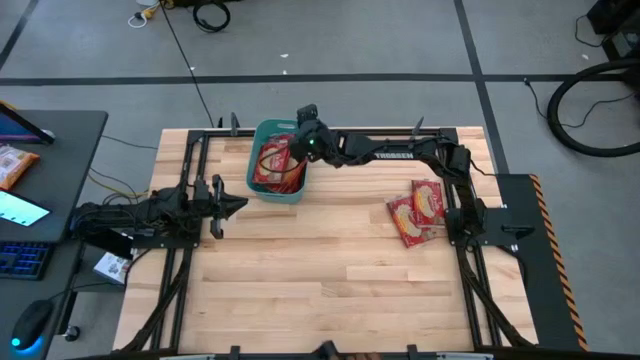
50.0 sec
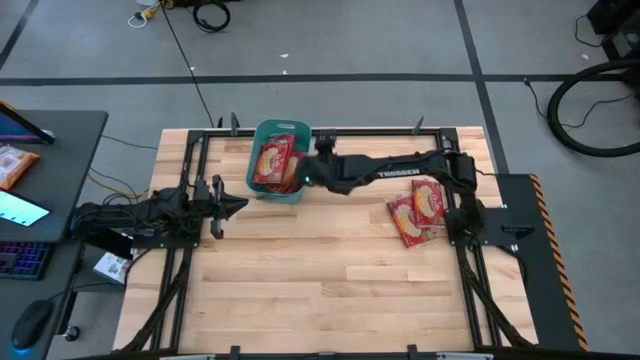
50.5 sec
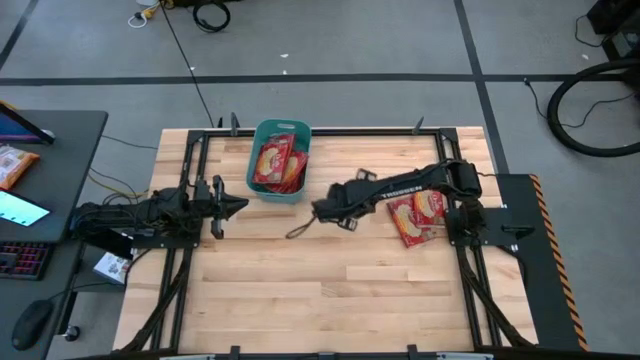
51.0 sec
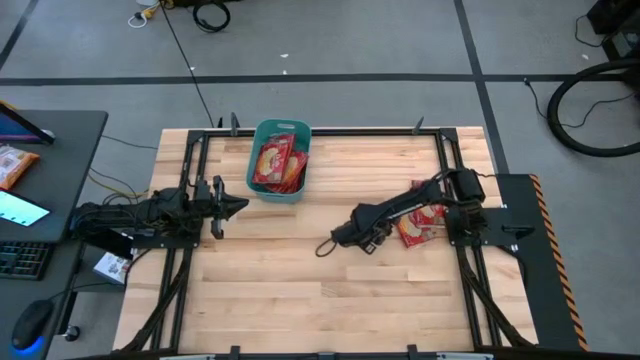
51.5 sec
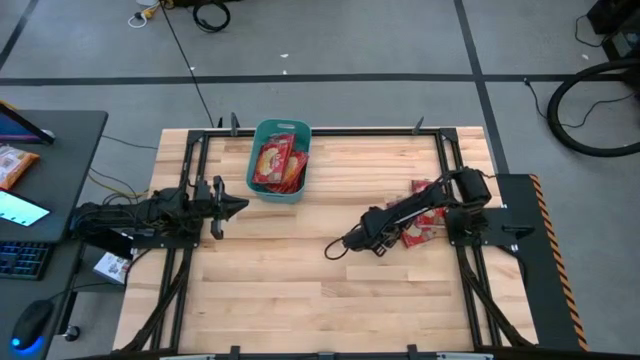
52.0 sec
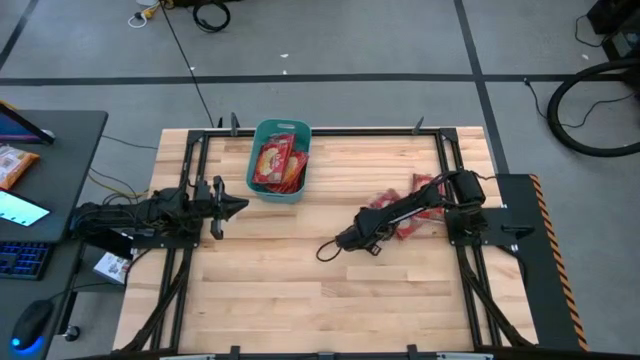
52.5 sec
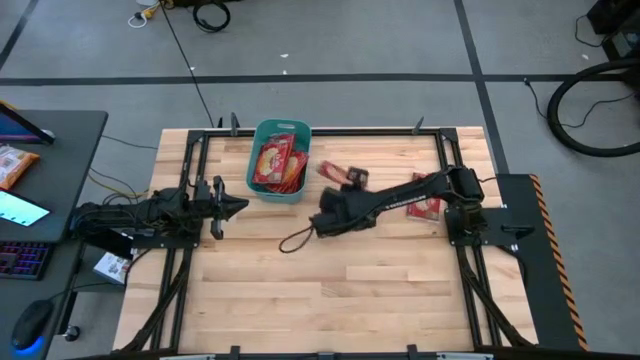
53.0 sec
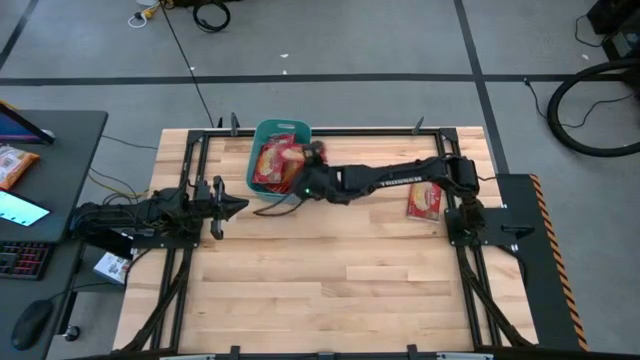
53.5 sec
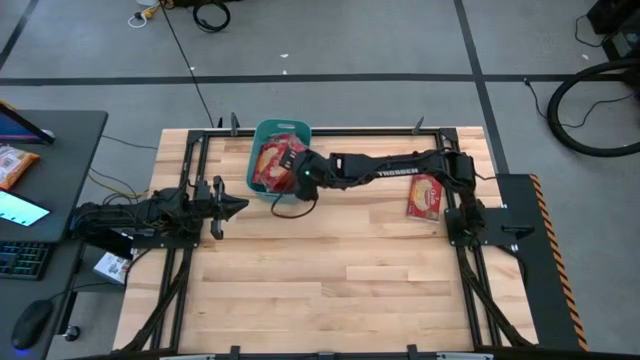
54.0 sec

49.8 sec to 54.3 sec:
Task: Sort popcorn bags into baskets
Put the red popcorn bag into the green bin

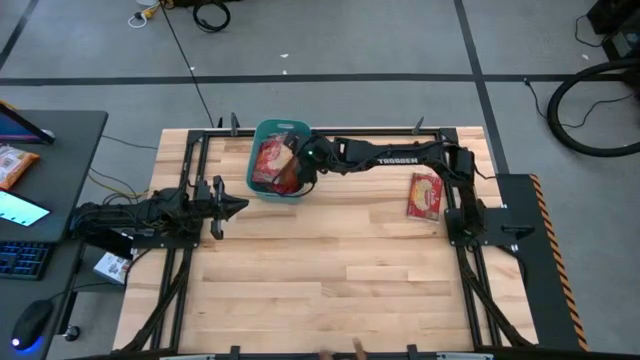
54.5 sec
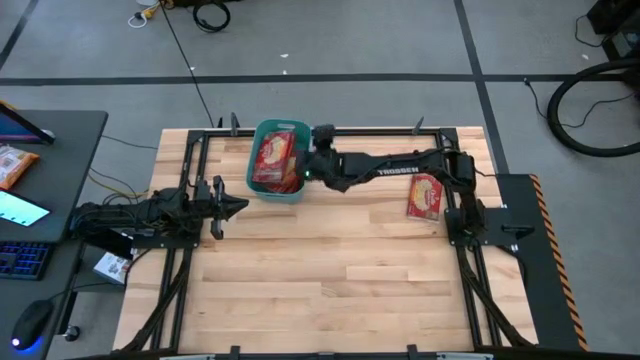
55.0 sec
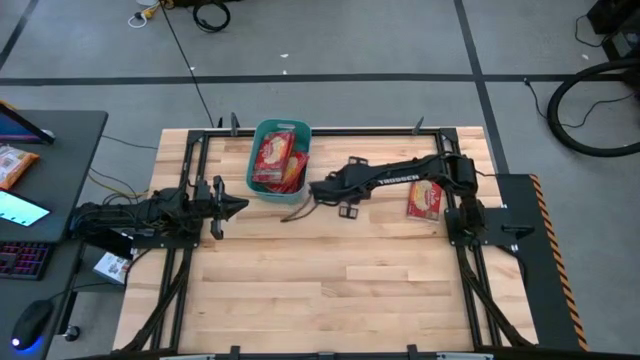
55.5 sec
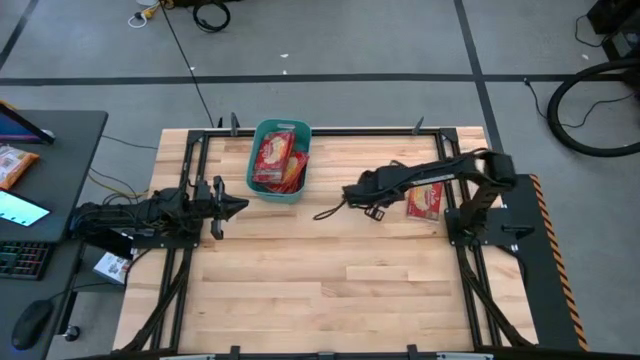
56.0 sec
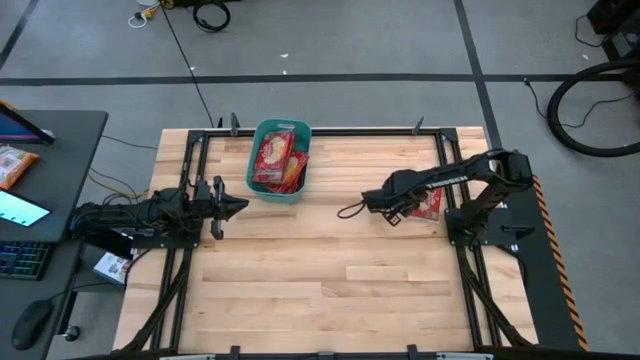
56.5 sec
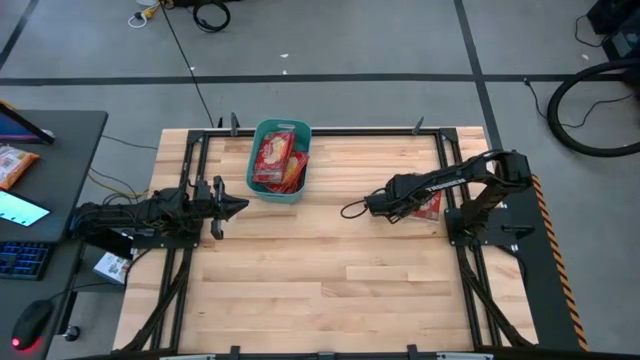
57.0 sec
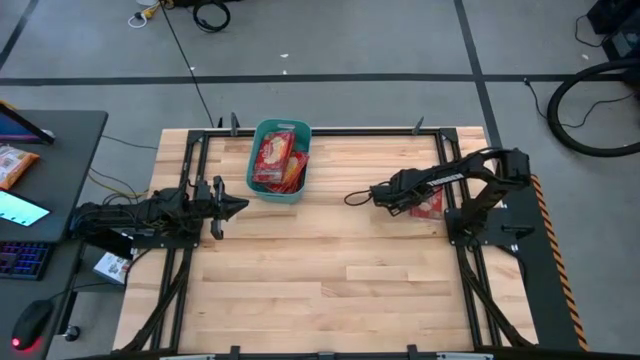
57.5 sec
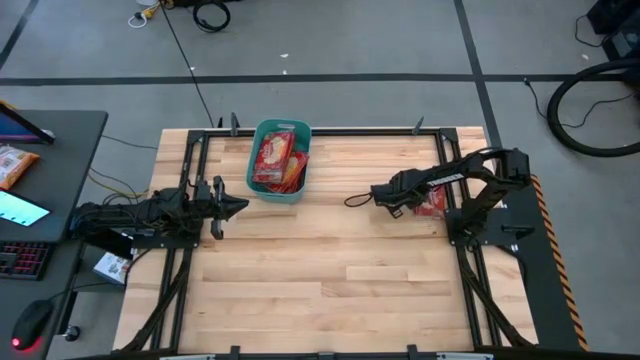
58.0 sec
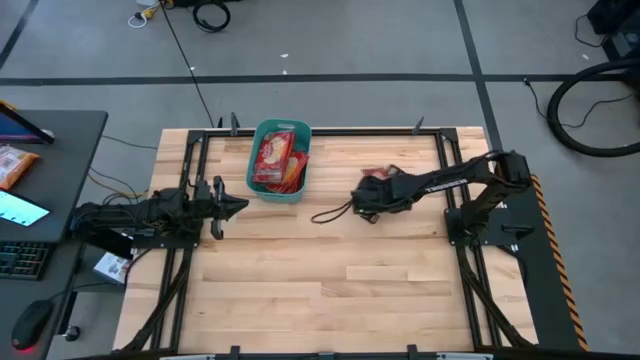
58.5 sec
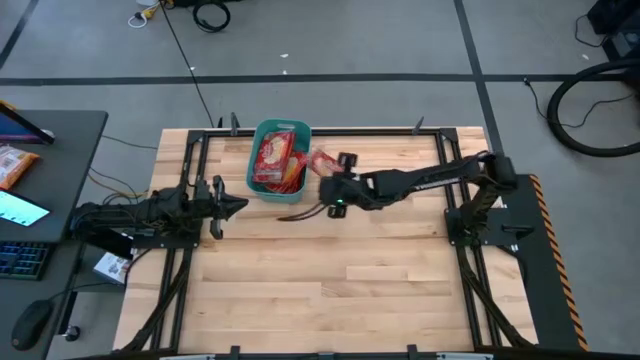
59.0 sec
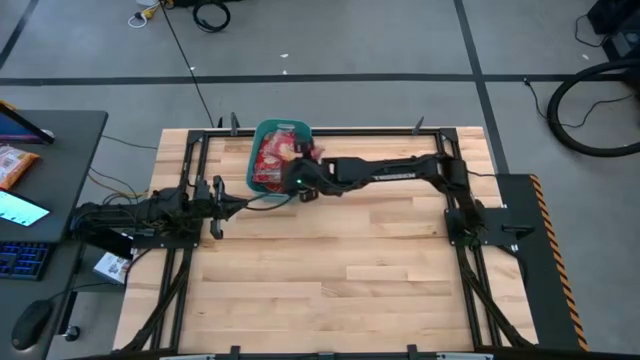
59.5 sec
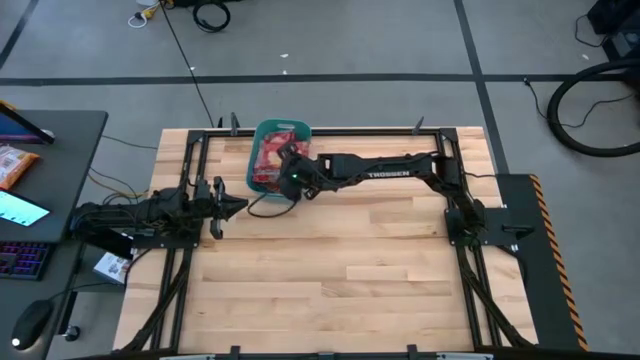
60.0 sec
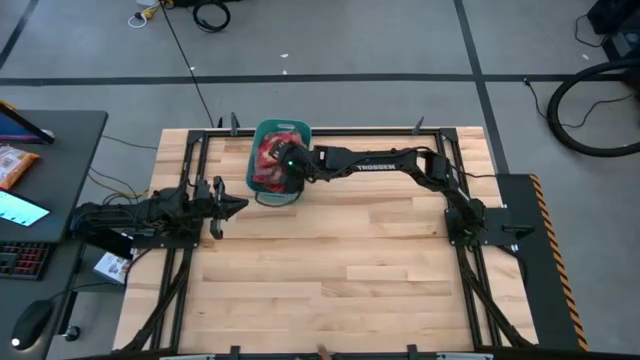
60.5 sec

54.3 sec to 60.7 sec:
Put the red popcorn bag into the green bin

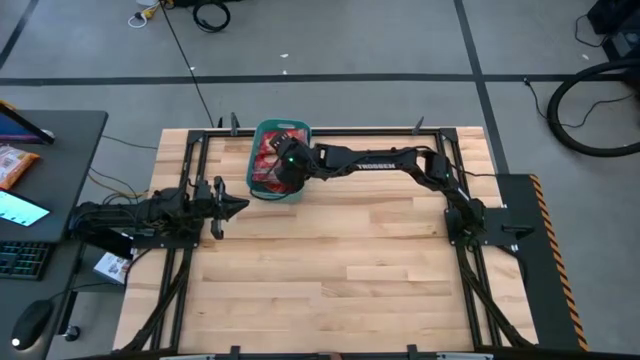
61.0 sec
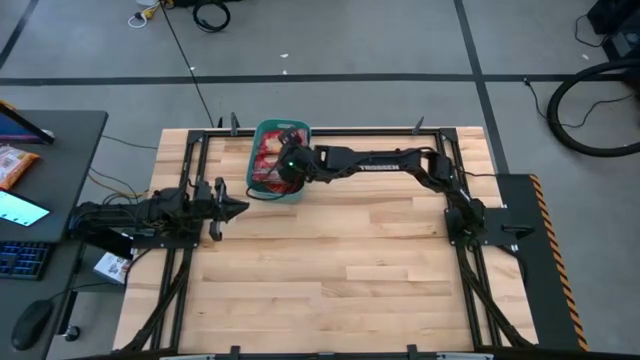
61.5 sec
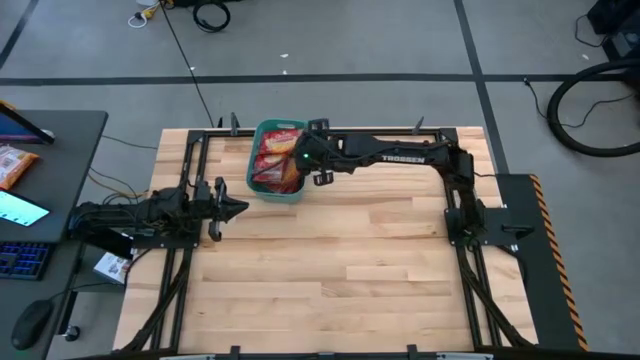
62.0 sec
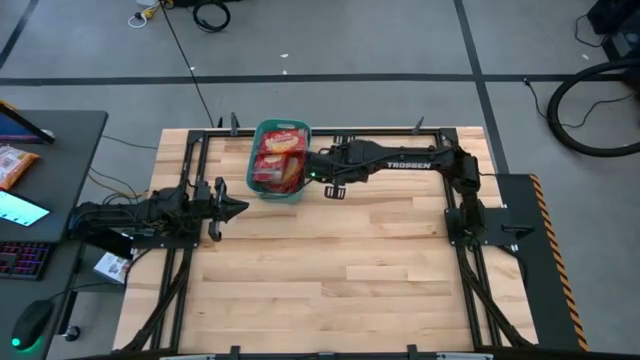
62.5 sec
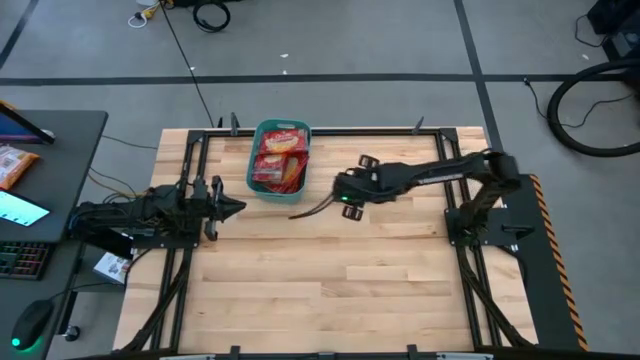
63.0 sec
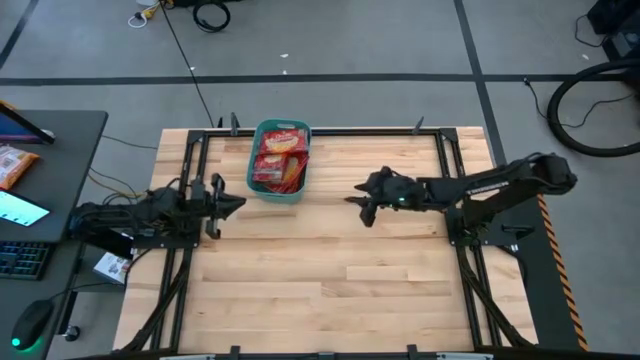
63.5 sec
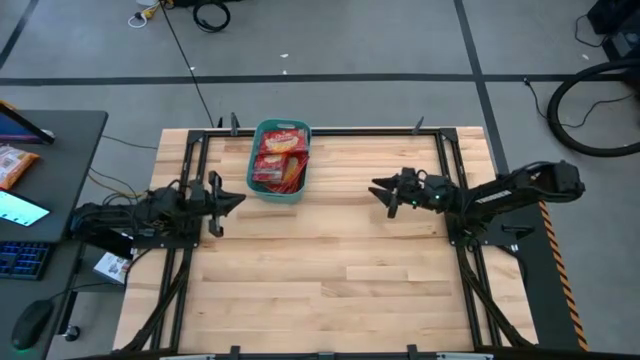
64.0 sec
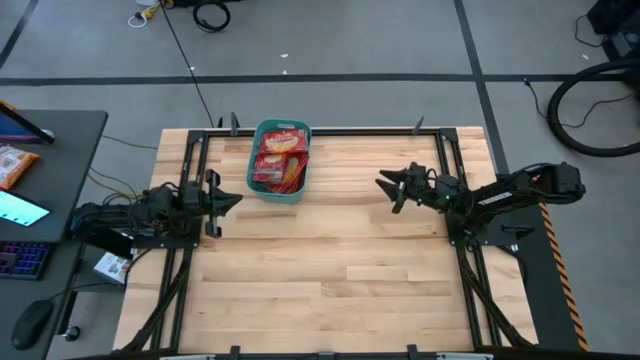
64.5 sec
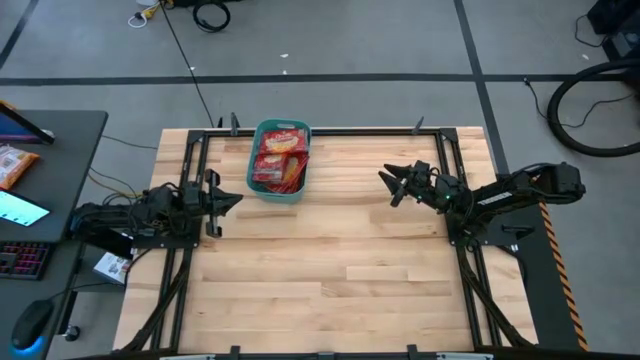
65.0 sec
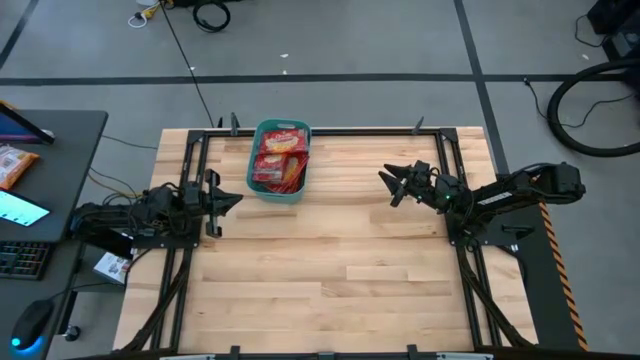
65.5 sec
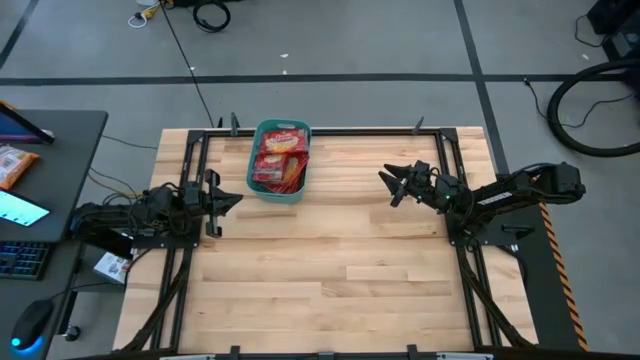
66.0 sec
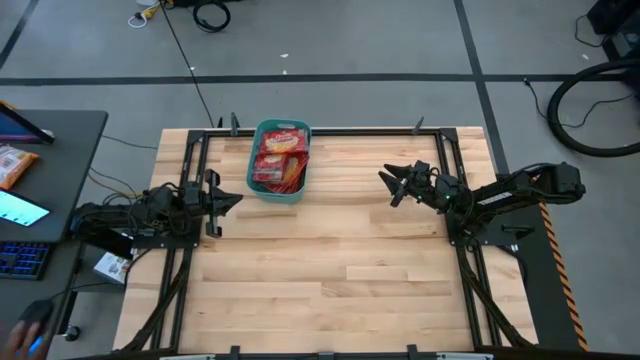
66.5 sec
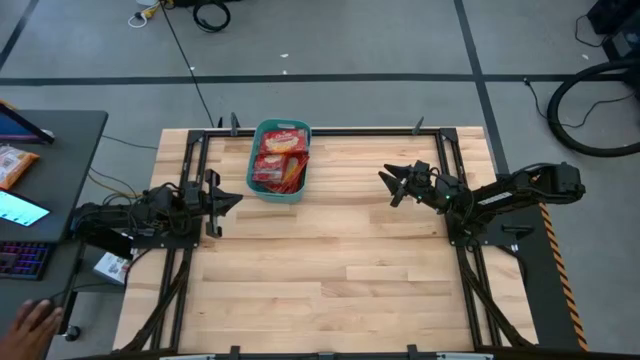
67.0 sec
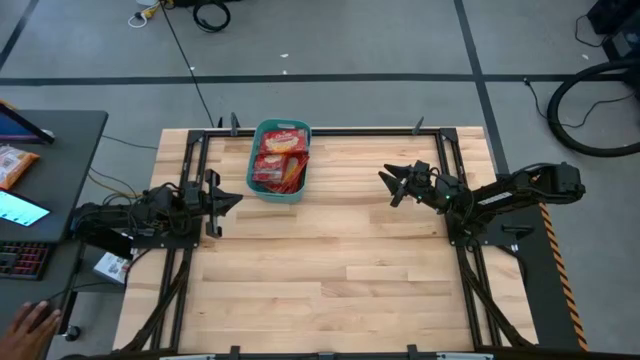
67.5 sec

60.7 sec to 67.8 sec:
Return to Home Position

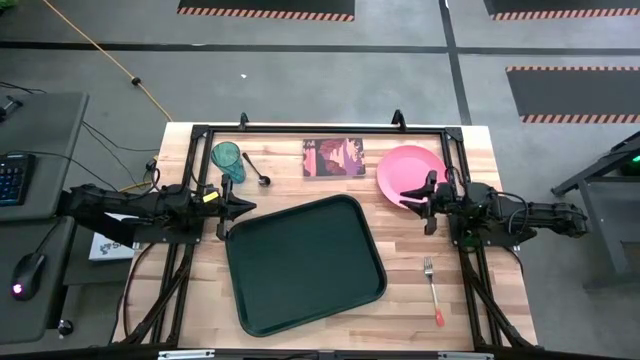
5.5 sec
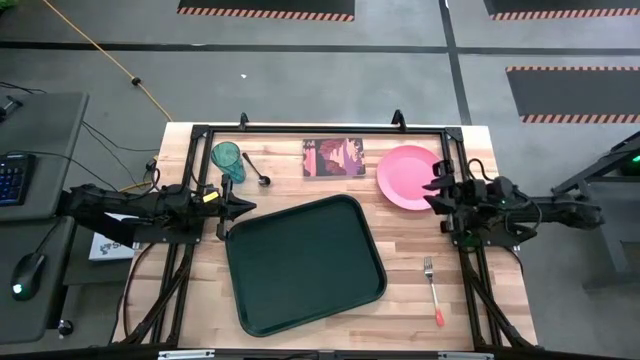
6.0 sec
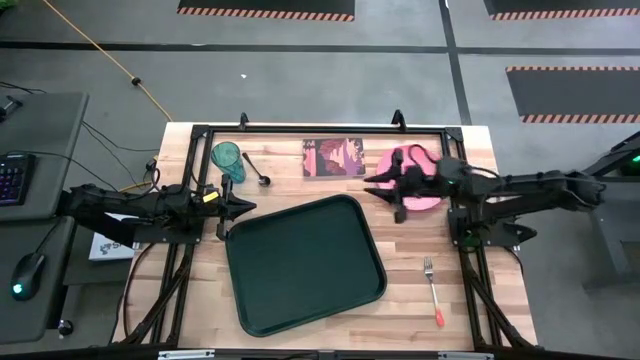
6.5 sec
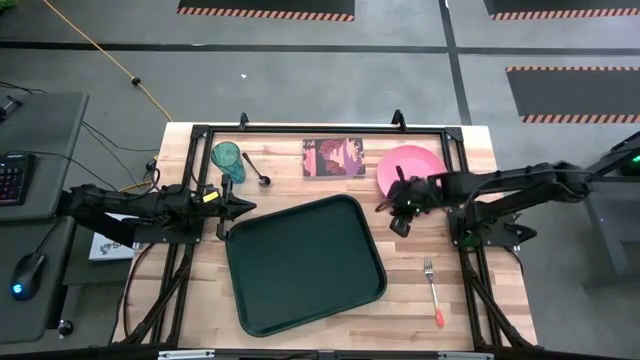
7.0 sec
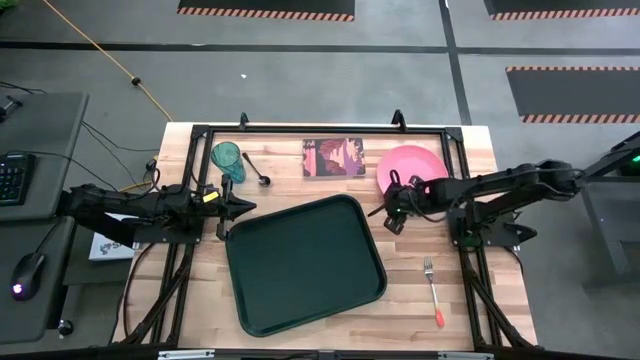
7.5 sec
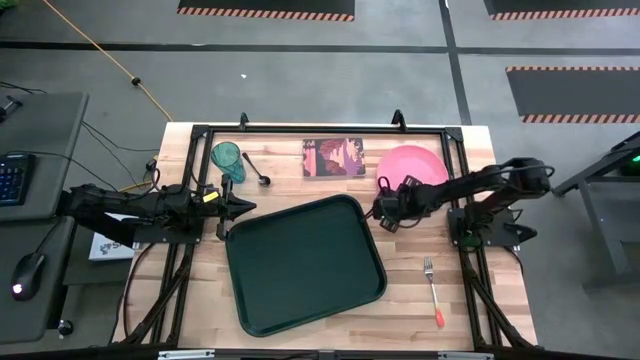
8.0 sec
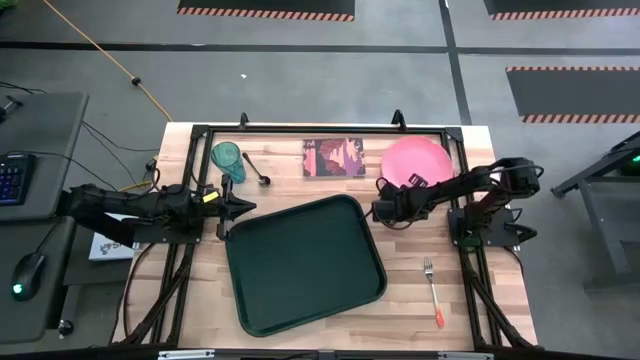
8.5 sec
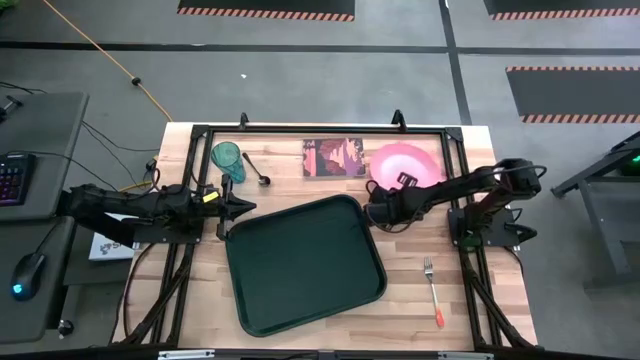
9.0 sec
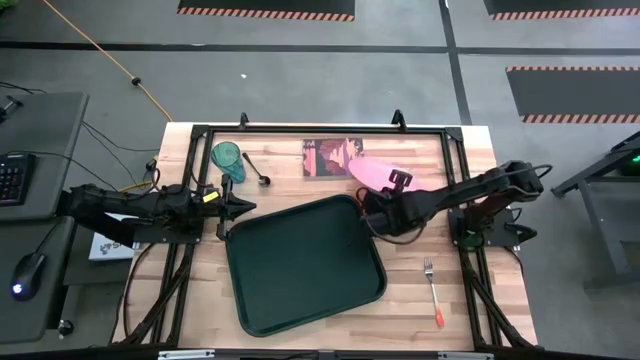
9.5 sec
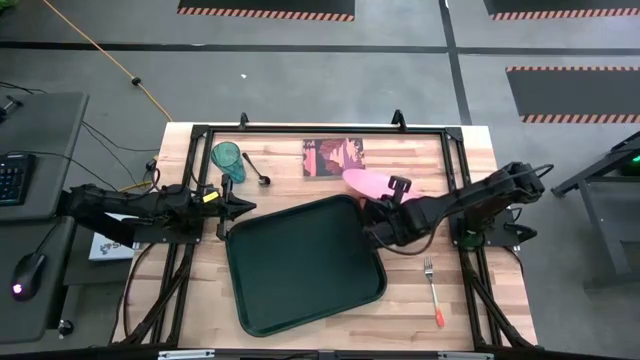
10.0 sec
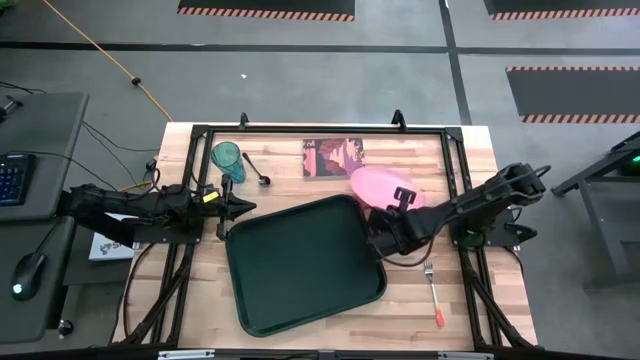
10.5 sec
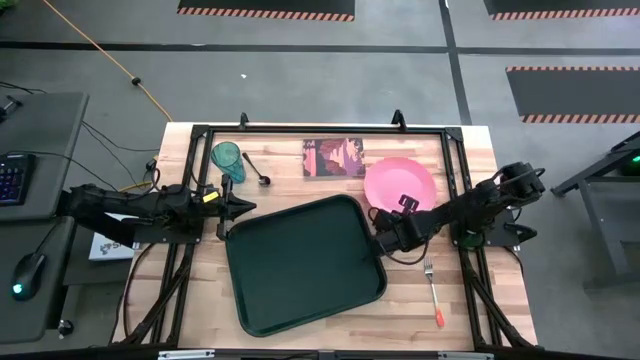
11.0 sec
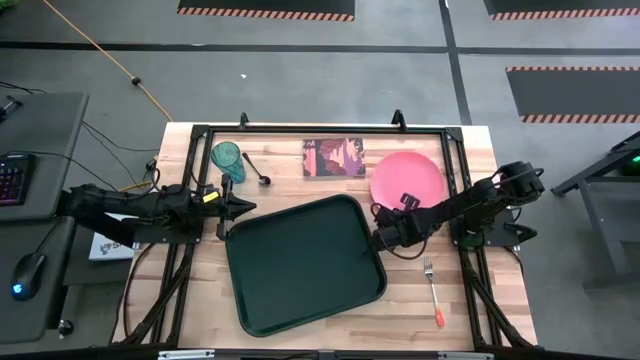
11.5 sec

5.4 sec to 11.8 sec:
Task: Pick and place plate/cup/fork/spoon on tray
Put the pink plate on the center of the black serving tray
